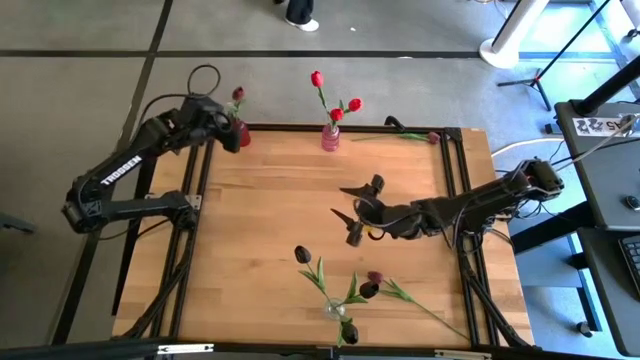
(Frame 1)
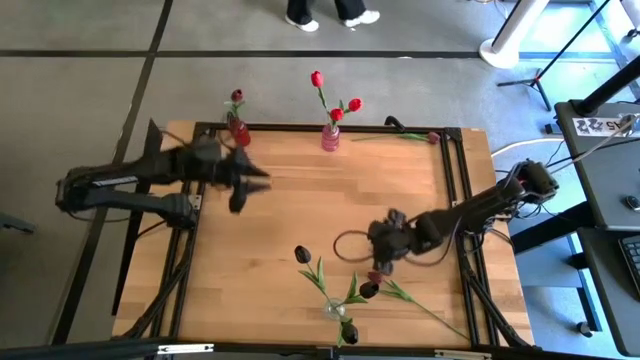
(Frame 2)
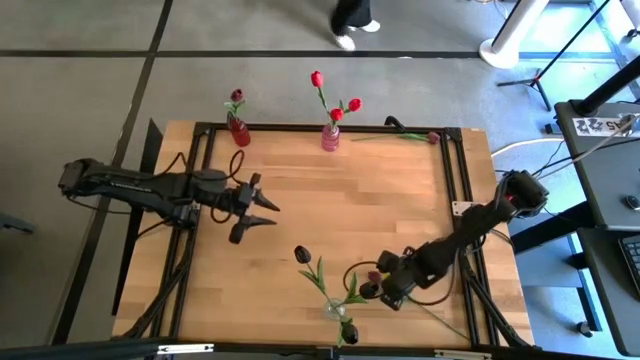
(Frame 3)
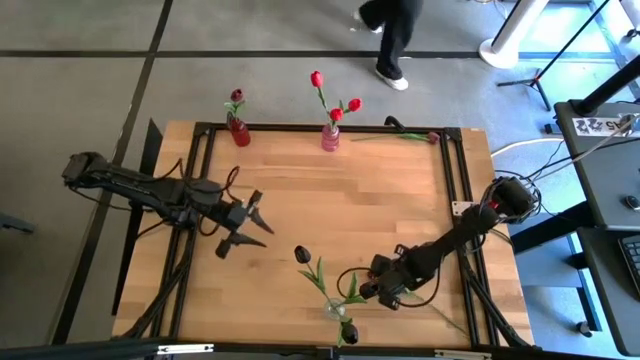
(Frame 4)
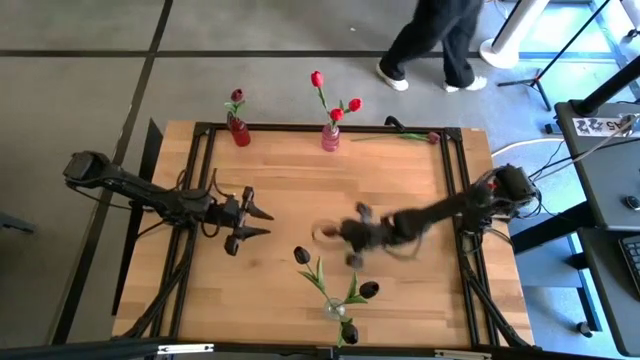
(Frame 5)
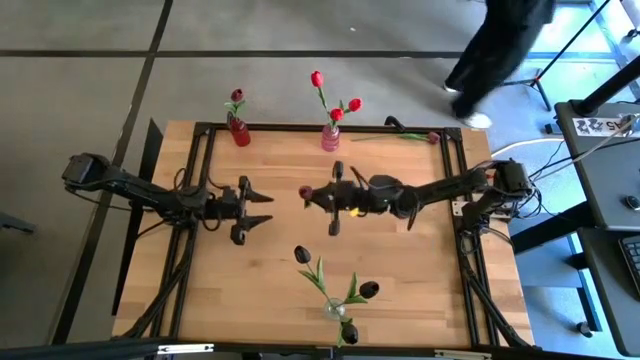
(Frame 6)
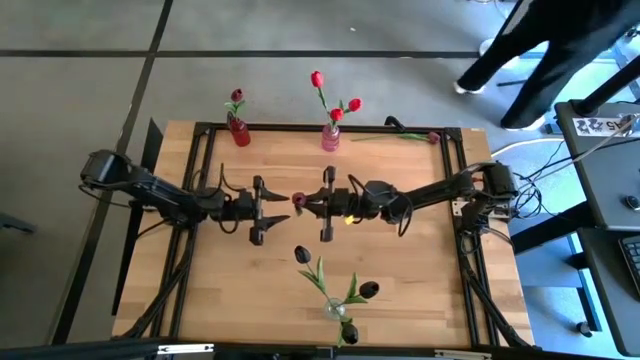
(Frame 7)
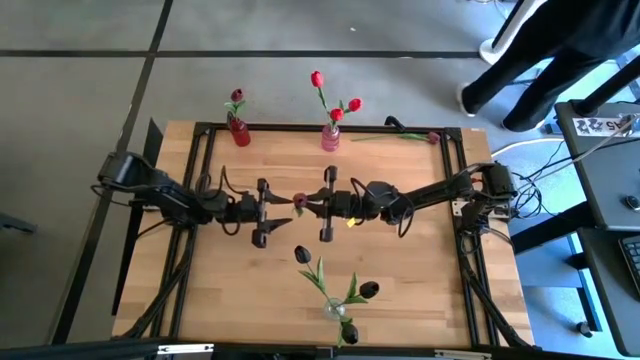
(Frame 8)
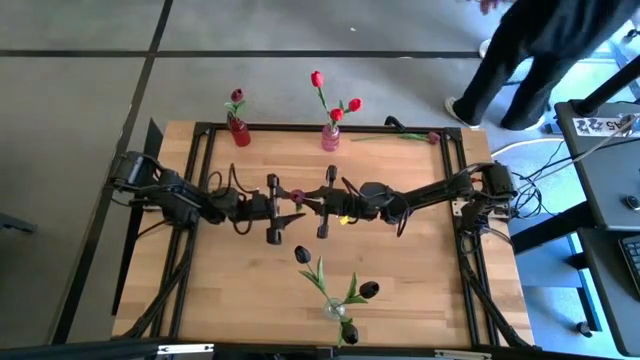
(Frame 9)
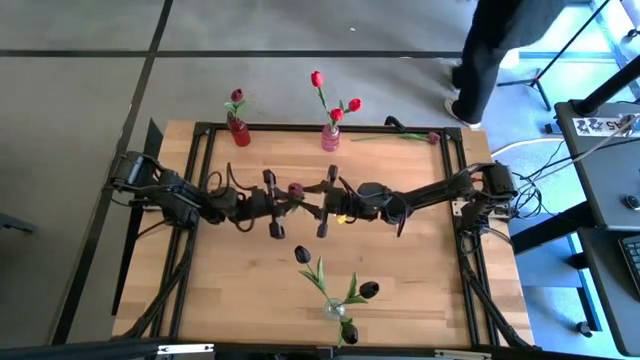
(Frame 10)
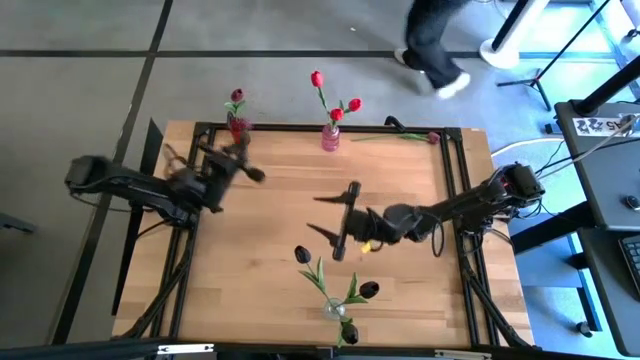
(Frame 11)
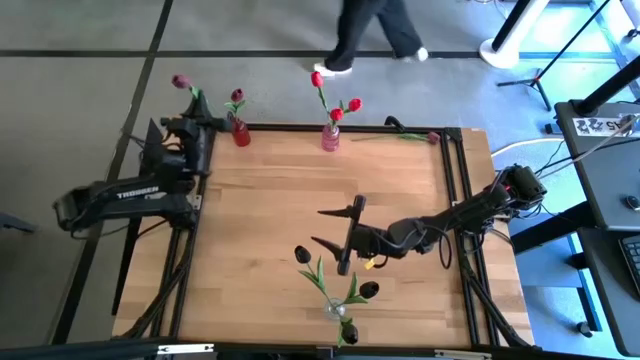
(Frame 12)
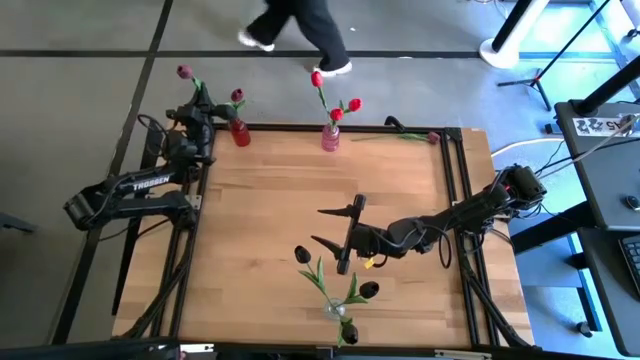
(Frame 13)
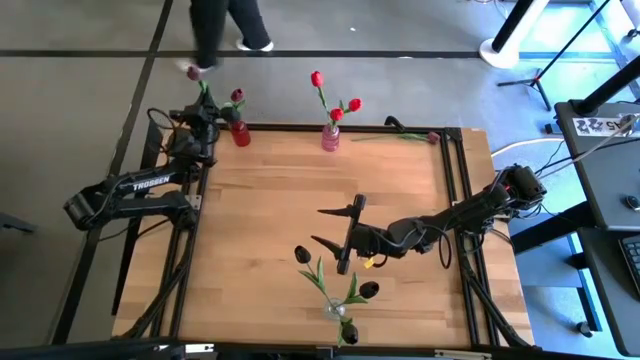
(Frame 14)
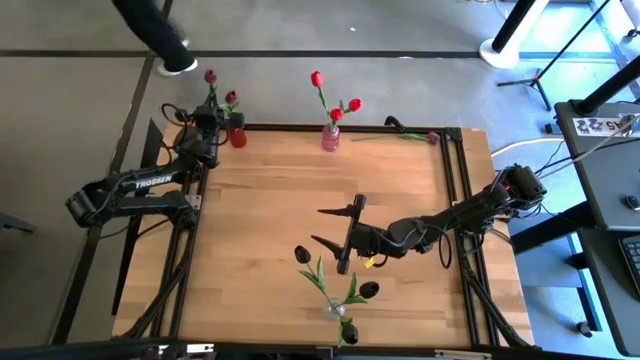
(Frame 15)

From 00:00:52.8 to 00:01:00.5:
Task: Sort flowers into vase by color
Put the bottom dark red flower into the red flower vase

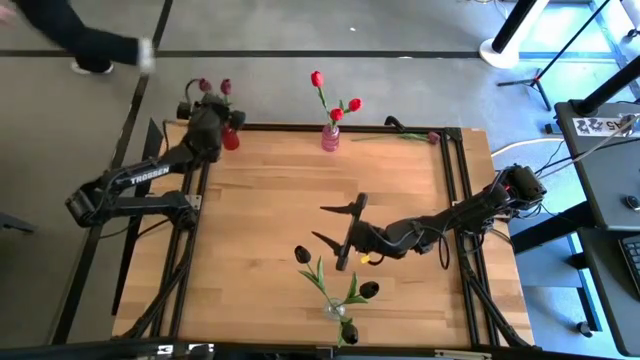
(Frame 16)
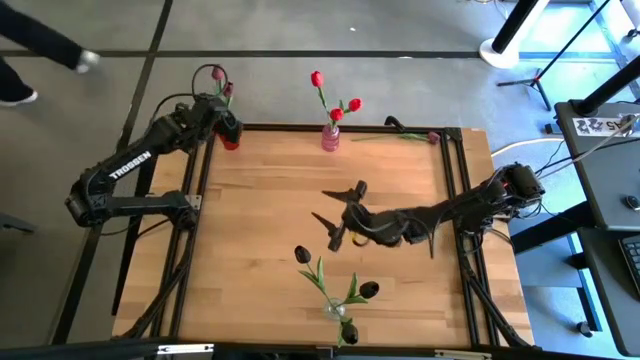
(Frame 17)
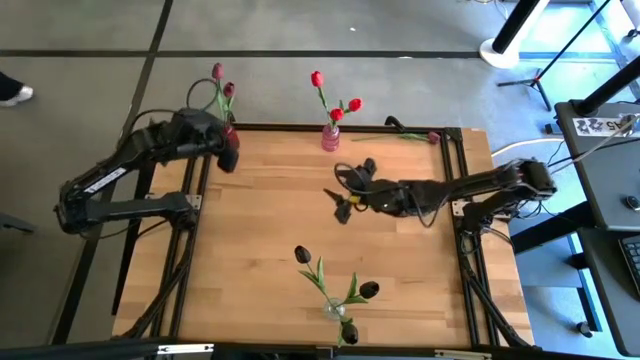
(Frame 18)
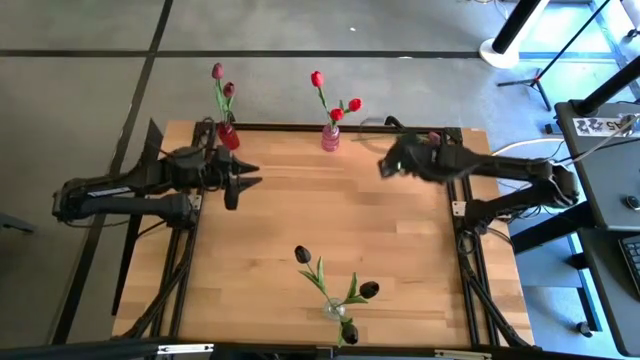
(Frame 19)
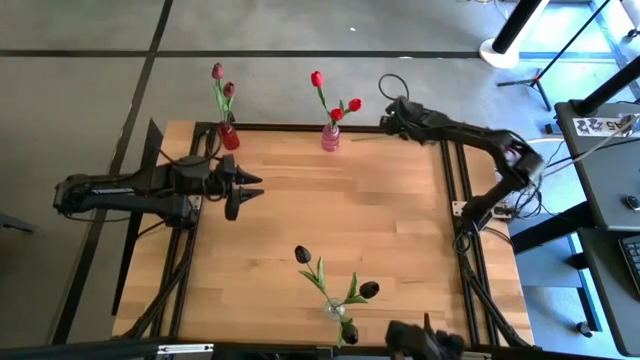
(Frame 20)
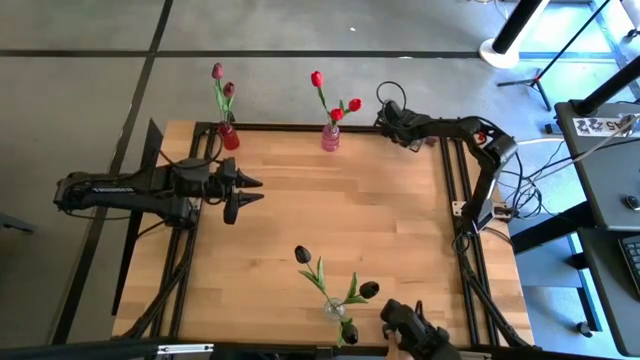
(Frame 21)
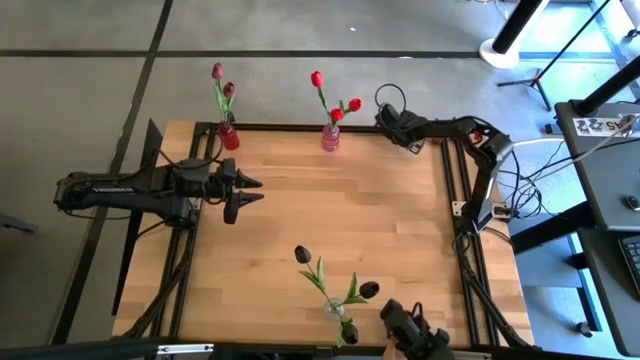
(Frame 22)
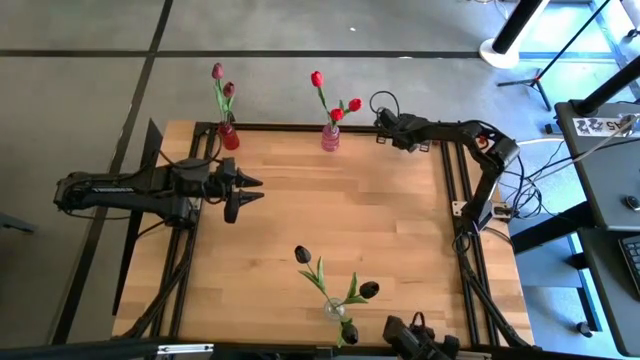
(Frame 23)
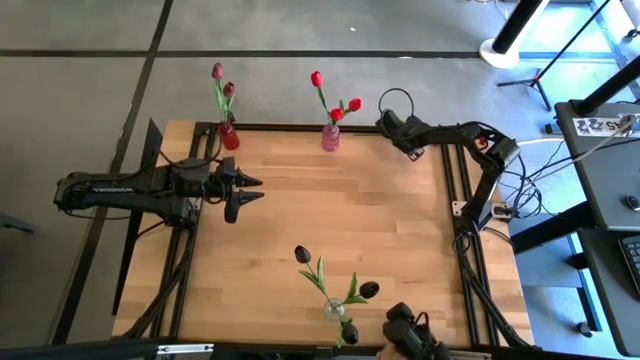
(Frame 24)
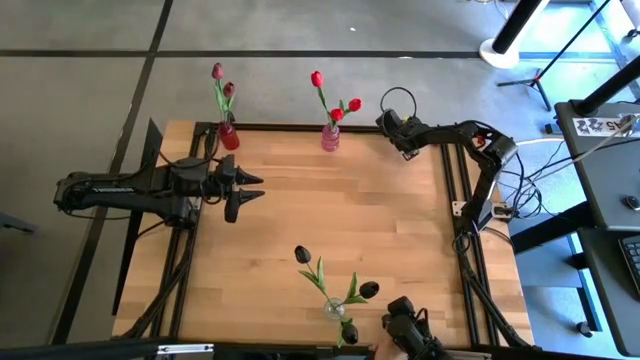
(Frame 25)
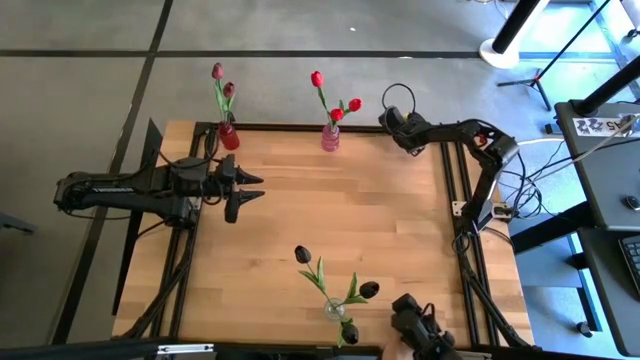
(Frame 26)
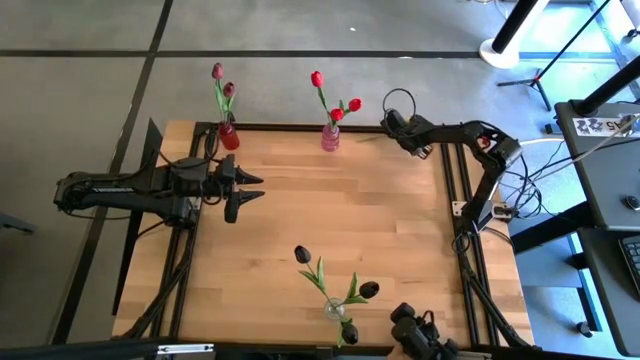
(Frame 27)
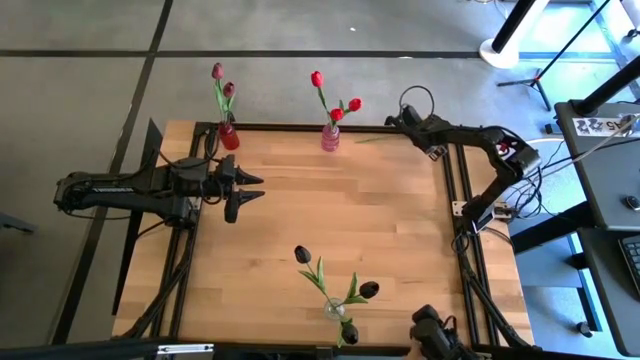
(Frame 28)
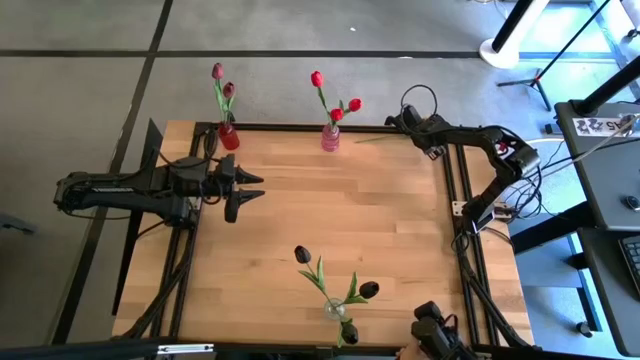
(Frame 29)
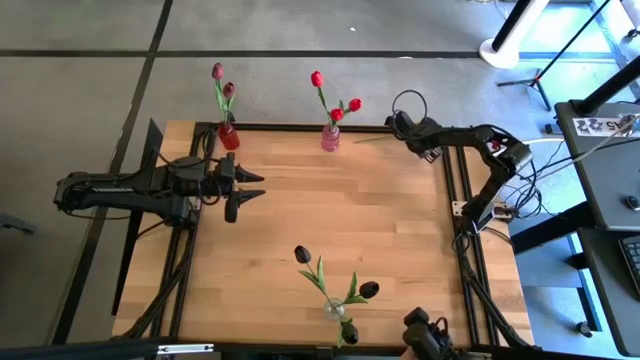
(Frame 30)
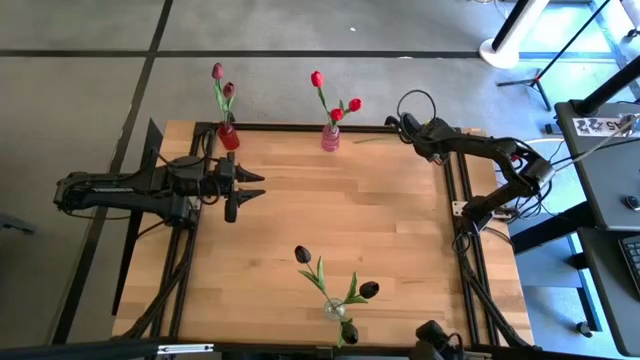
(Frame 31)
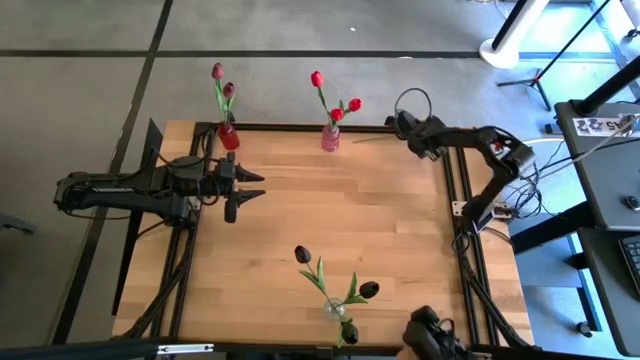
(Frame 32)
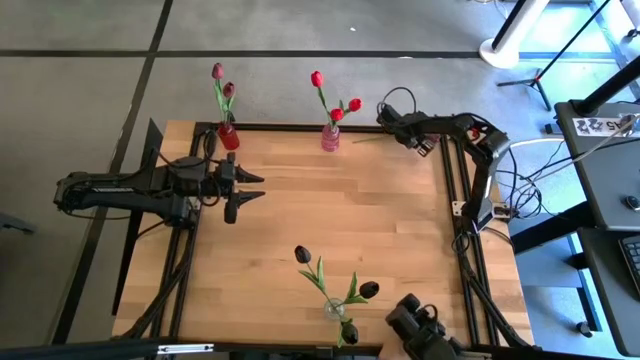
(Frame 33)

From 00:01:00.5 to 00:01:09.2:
Put the dark red flower into the red flower vase

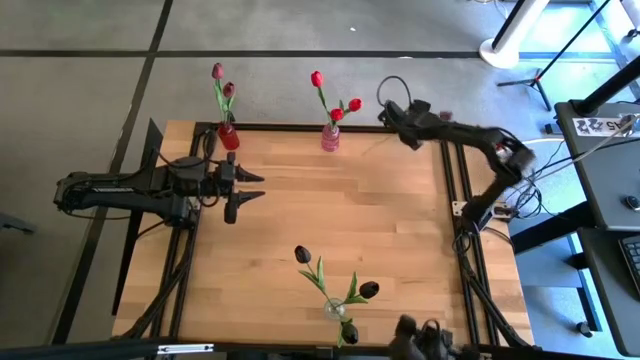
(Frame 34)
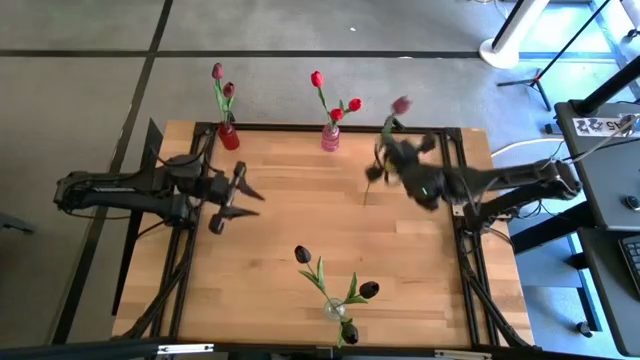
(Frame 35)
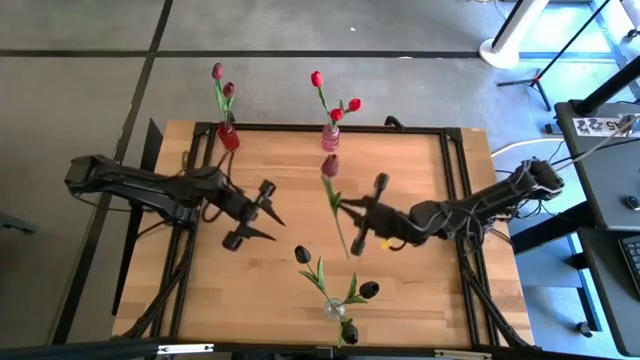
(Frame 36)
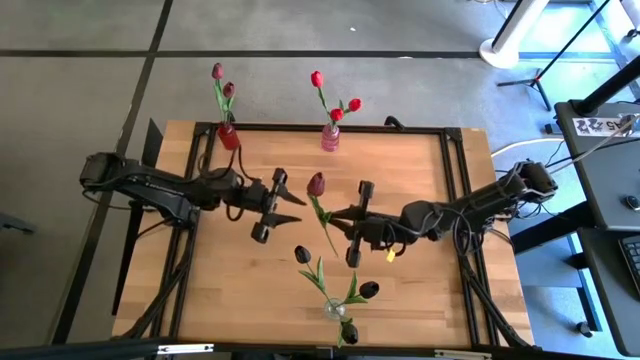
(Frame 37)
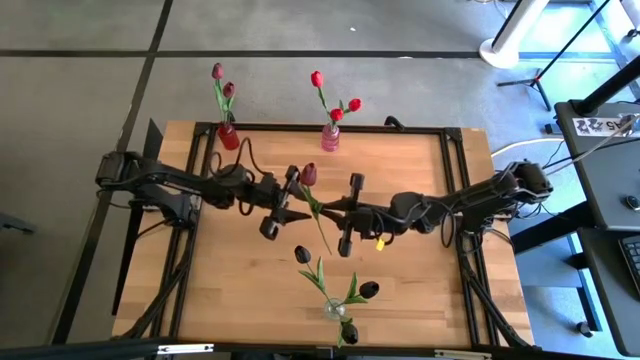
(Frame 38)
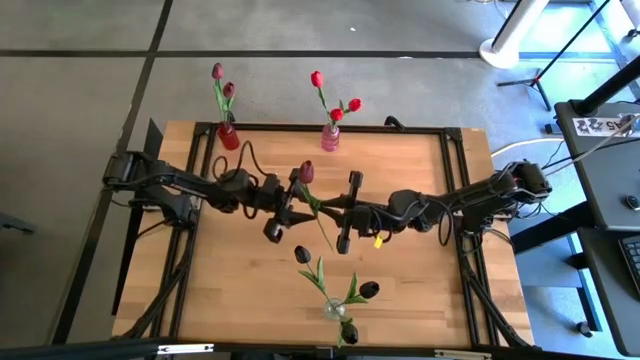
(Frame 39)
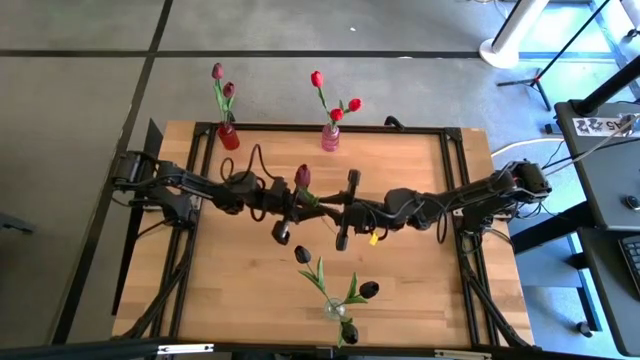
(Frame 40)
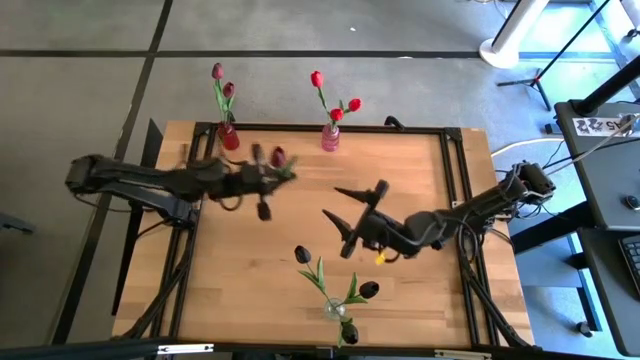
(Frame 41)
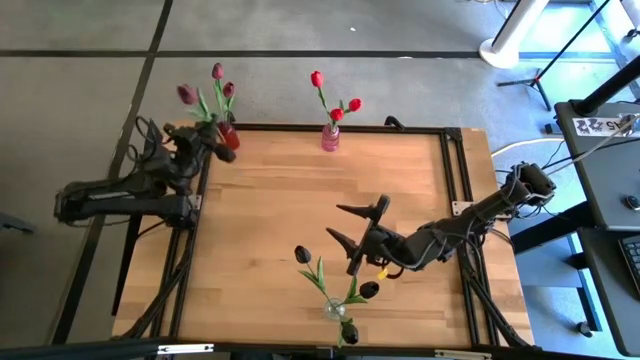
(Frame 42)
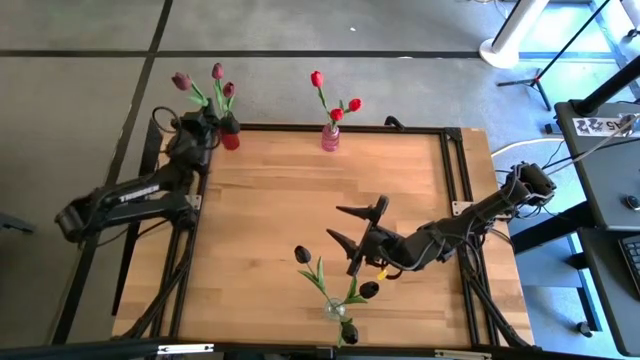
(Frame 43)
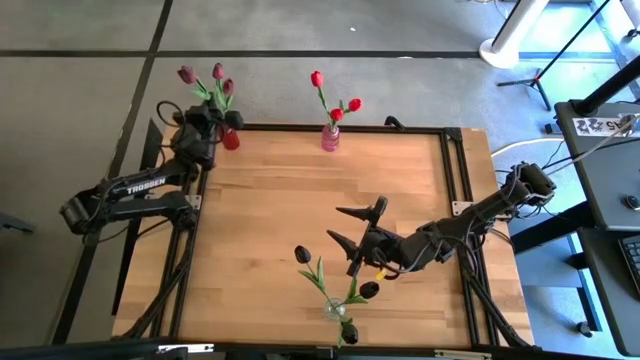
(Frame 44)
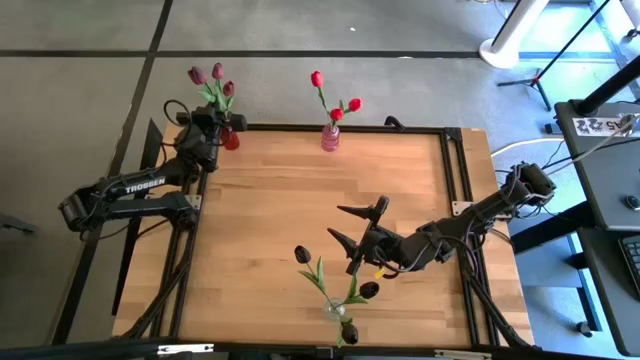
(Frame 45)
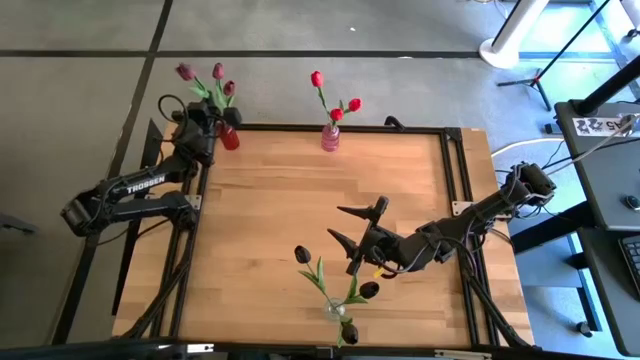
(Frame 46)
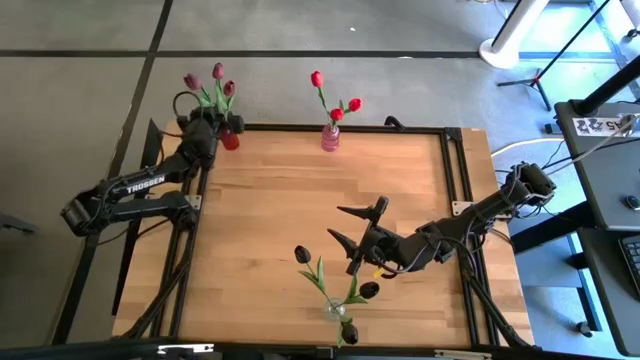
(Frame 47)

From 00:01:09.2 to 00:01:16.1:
Put the dark red flower into the red flower vase
